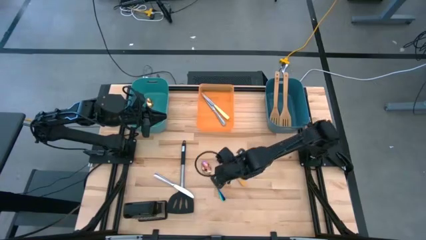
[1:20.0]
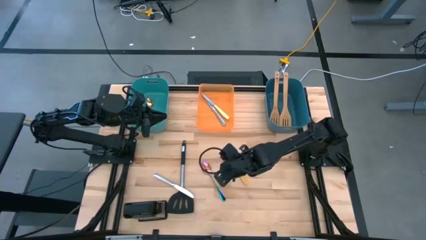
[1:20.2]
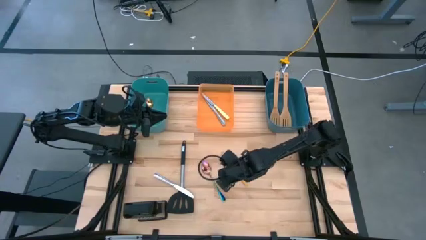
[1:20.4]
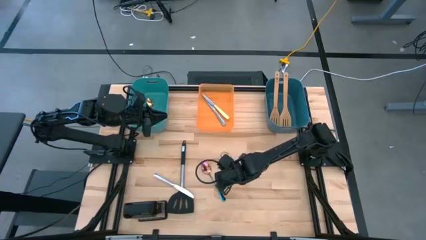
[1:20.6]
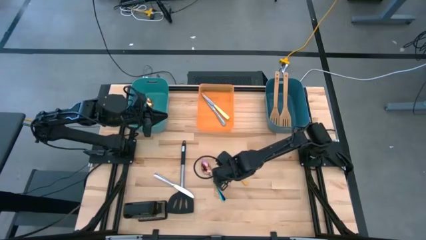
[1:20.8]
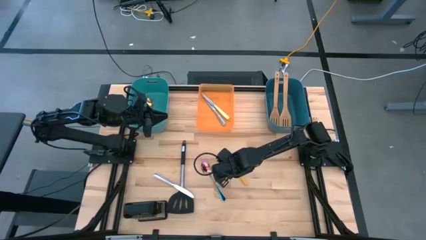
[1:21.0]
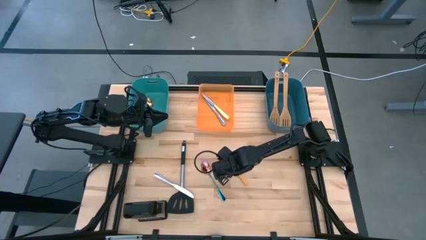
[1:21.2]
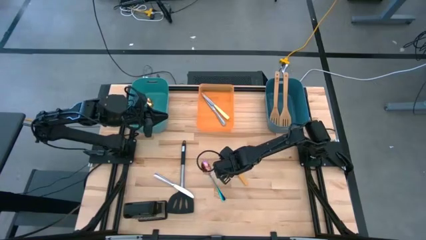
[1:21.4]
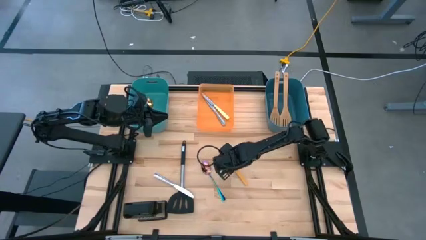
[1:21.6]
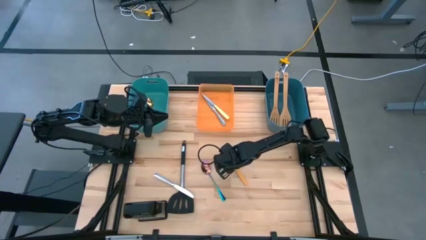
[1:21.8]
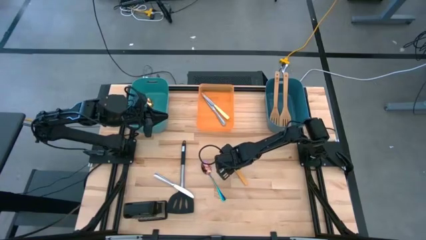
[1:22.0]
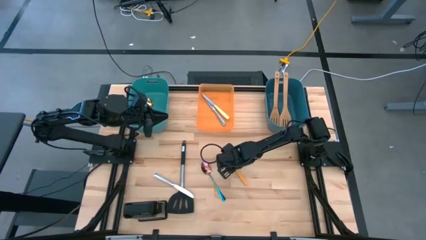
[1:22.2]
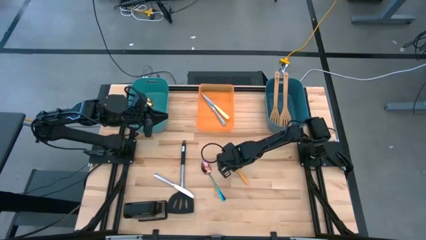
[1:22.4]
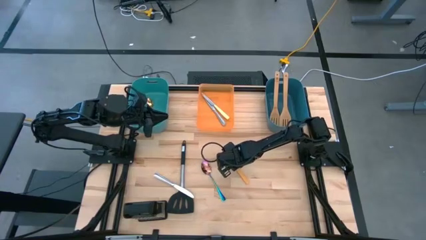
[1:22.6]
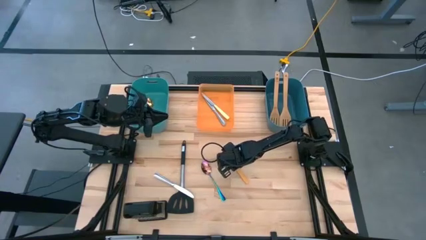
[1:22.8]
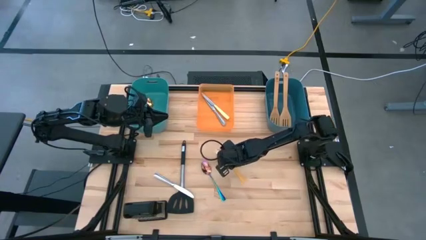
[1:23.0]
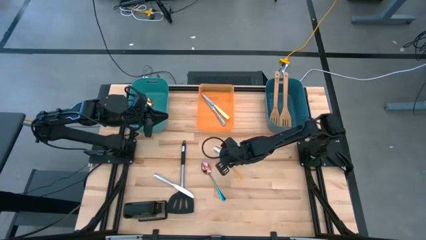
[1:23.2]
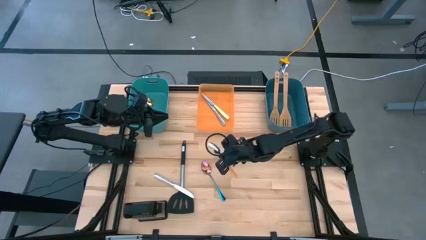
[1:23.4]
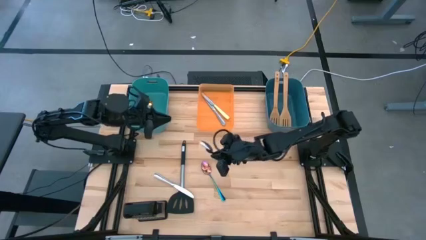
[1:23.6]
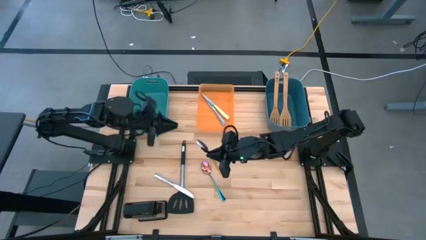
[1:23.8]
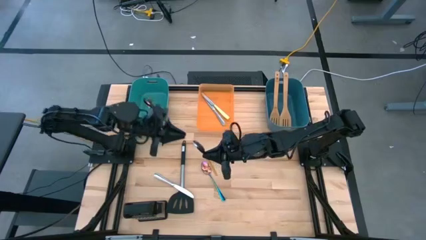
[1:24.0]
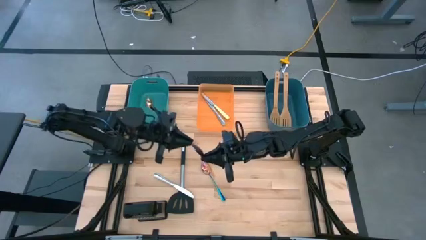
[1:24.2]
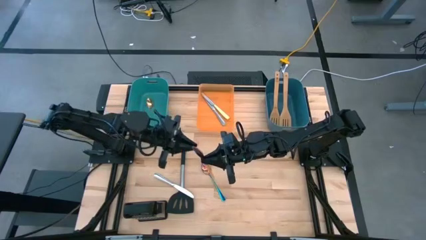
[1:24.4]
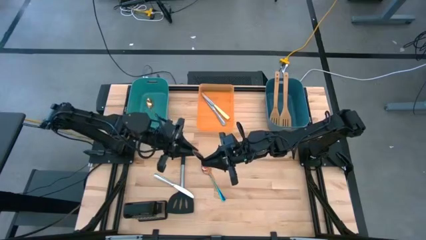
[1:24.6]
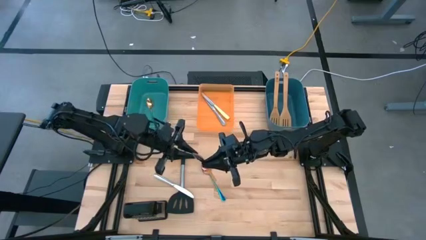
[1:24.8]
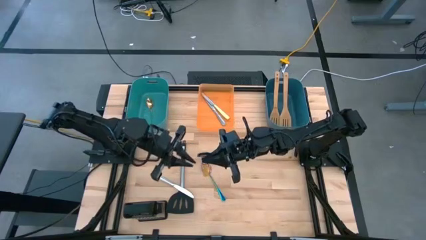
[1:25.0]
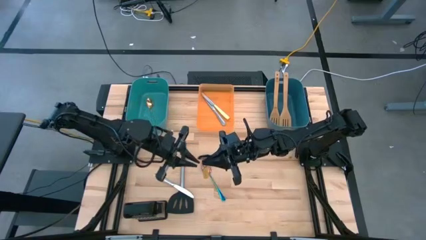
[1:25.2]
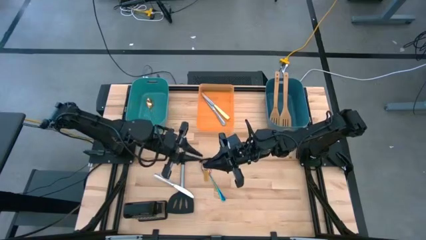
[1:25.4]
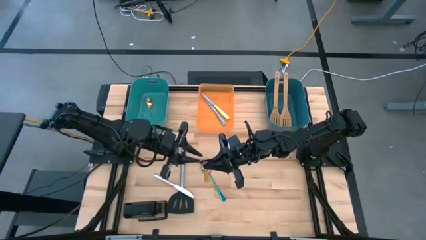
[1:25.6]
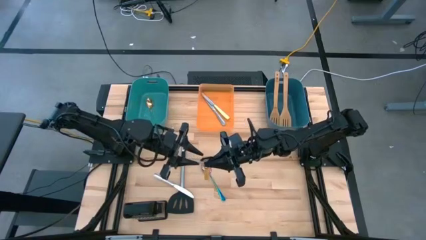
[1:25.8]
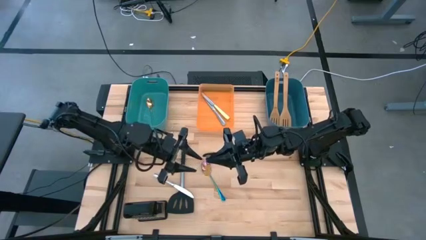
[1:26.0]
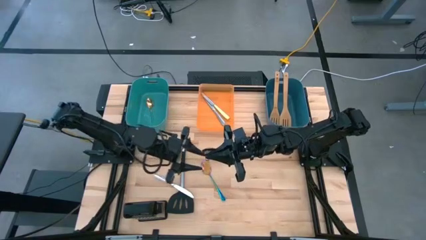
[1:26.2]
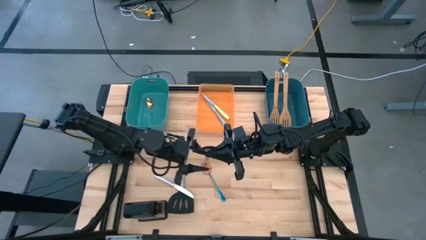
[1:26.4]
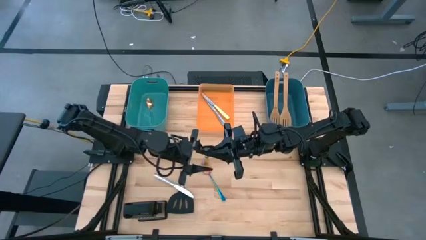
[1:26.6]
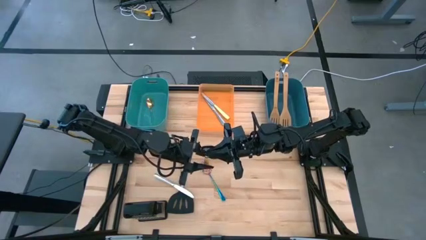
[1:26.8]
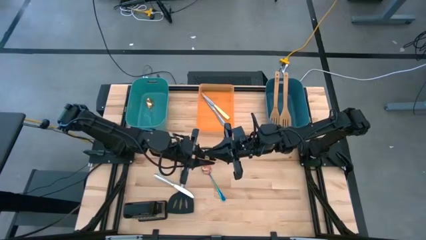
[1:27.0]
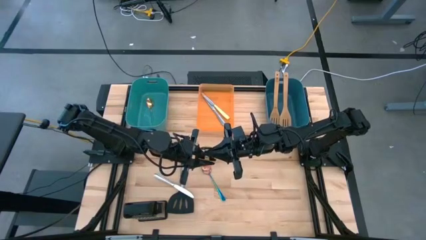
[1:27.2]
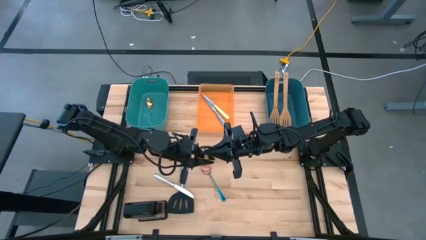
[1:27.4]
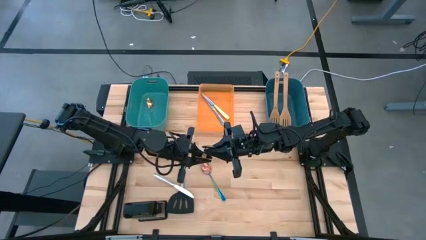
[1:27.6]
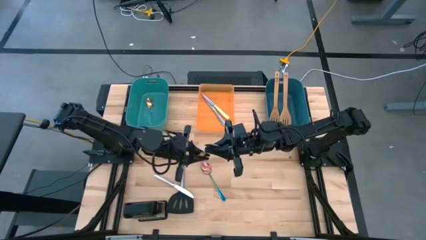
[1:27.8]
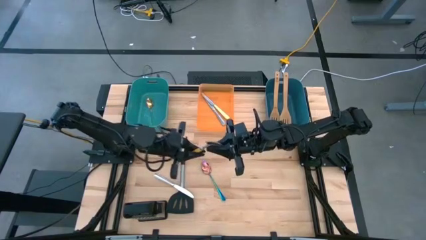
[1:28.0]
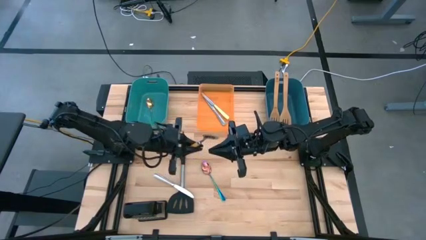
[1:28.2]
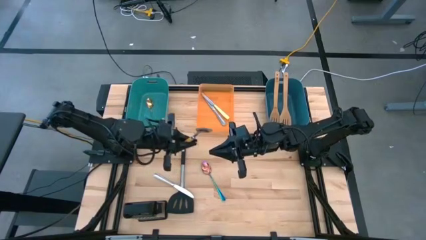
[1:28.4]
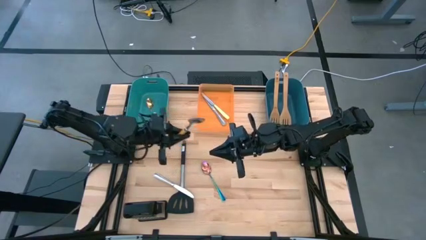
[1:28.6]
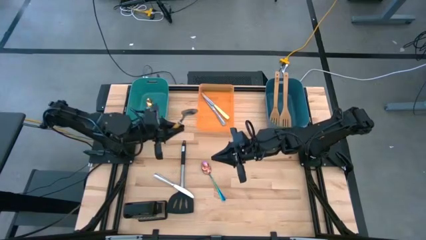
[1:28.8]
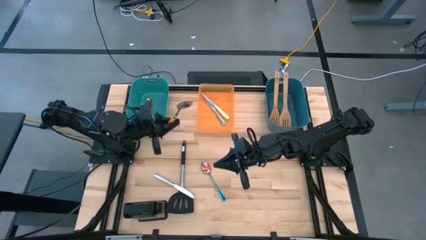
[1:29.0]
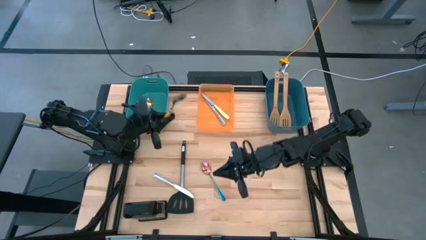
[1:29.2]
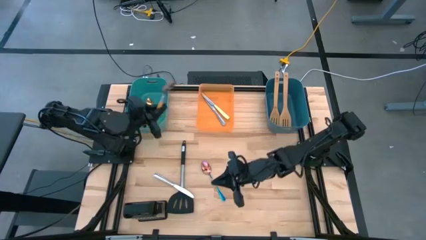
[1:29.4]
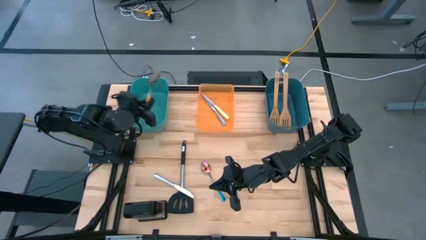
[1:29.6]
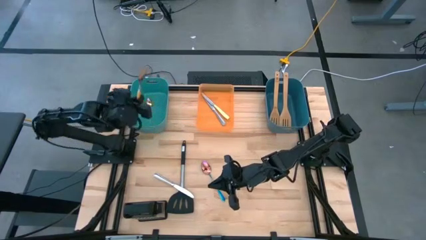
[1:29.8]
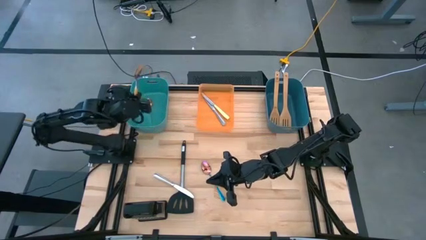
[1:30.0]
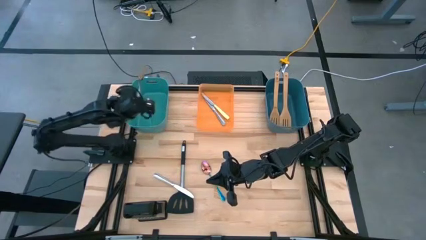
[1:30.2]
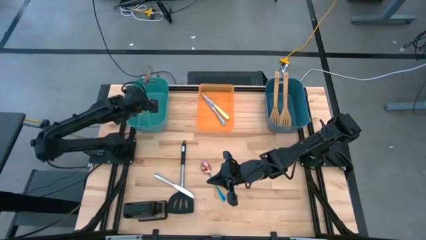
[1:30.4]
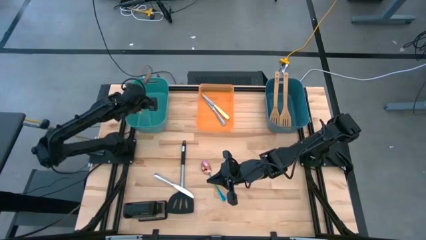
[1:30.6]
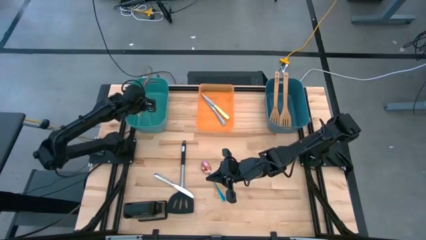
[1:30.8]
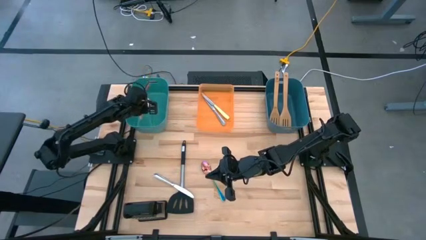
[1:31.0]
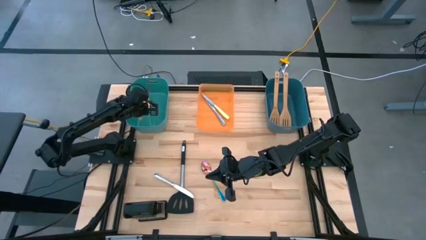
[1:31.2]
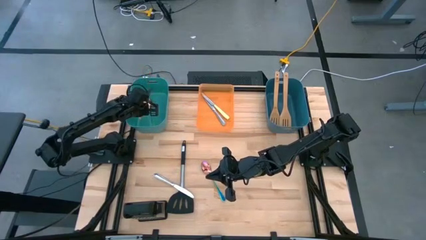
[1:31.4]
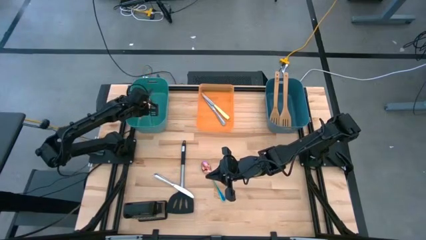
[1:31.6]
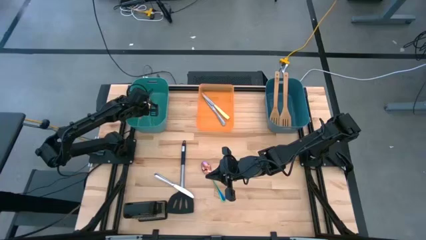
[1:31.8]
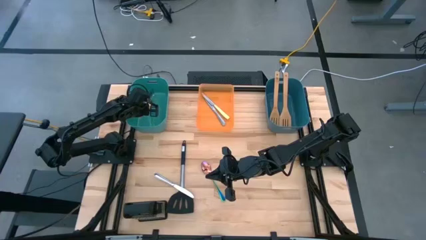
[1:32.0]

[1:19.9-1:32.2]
Task: Pick & Place Kitchen Items
Put the yellow spoon into the green bin
